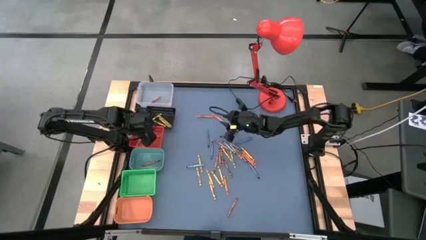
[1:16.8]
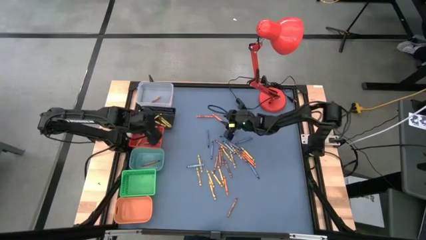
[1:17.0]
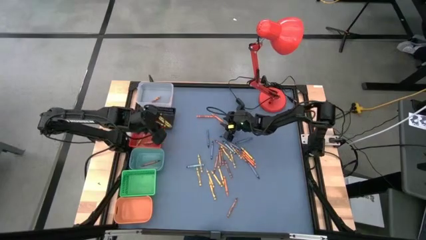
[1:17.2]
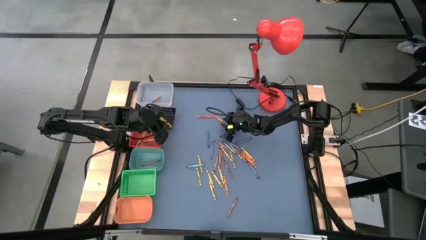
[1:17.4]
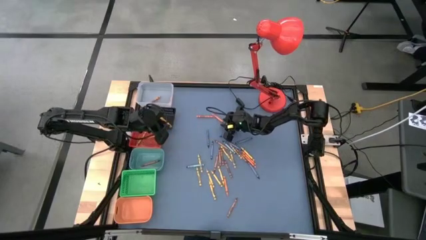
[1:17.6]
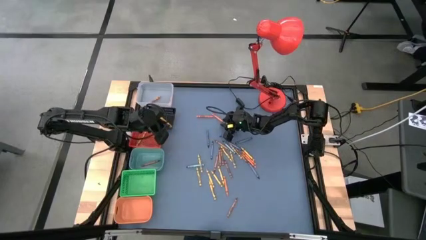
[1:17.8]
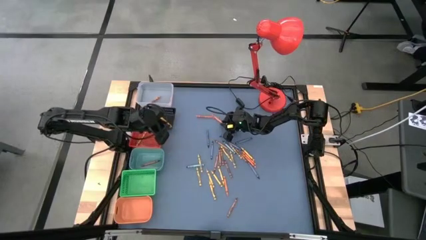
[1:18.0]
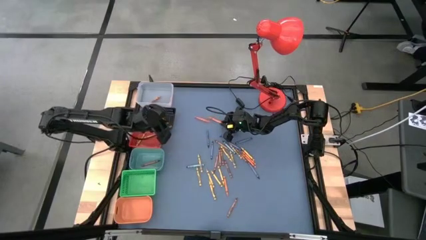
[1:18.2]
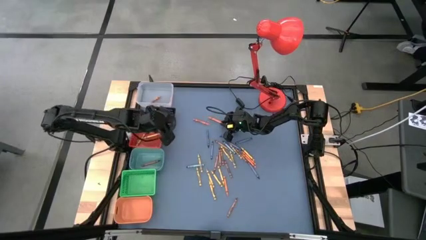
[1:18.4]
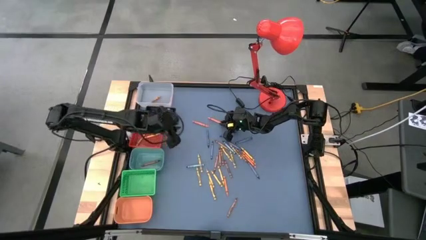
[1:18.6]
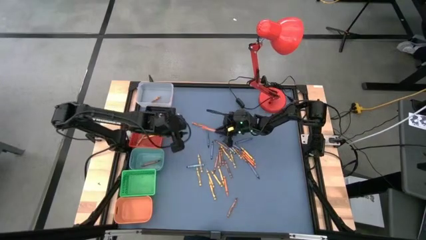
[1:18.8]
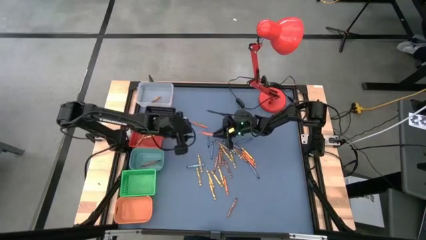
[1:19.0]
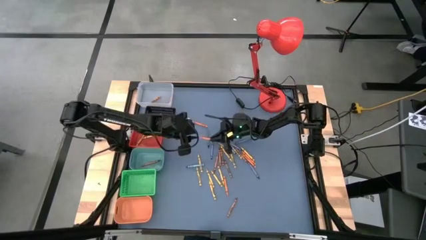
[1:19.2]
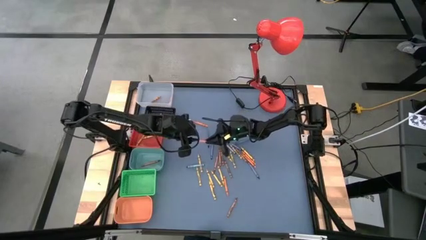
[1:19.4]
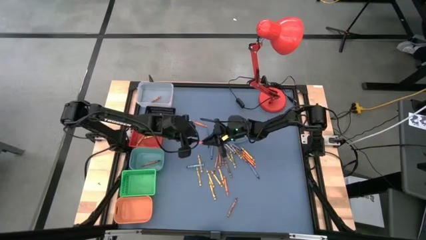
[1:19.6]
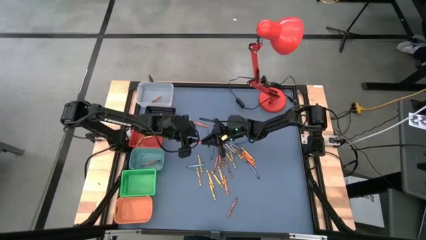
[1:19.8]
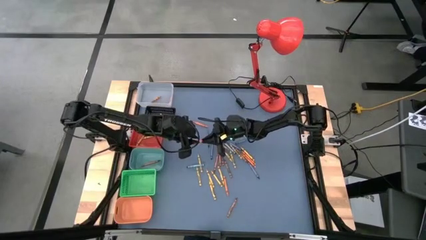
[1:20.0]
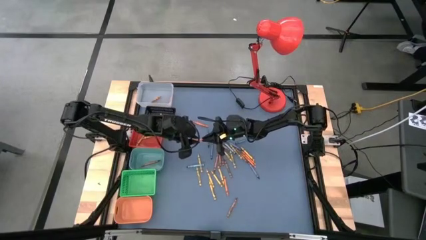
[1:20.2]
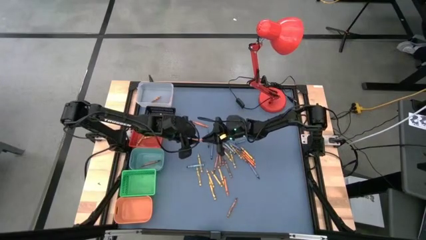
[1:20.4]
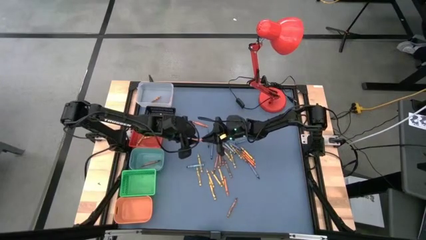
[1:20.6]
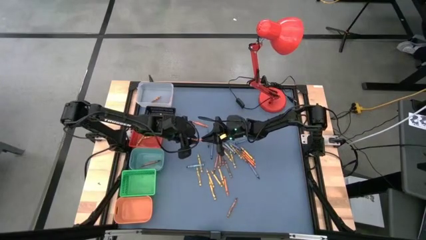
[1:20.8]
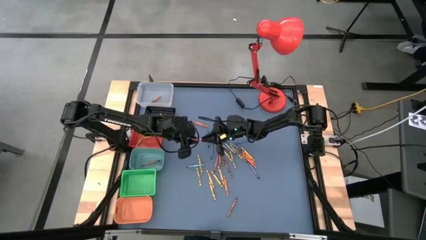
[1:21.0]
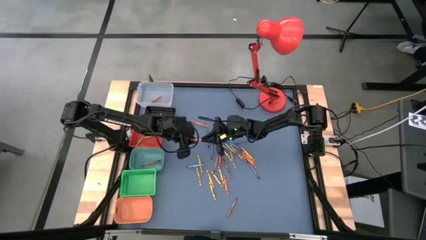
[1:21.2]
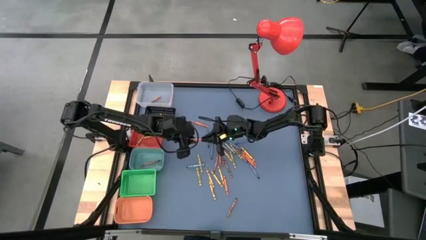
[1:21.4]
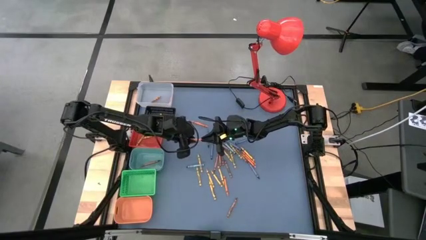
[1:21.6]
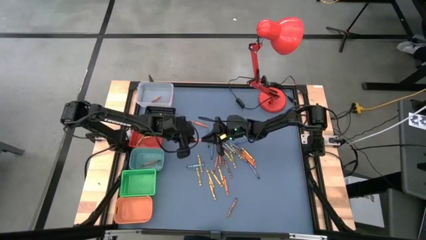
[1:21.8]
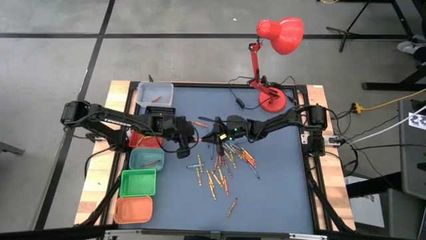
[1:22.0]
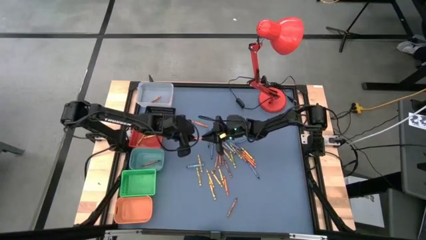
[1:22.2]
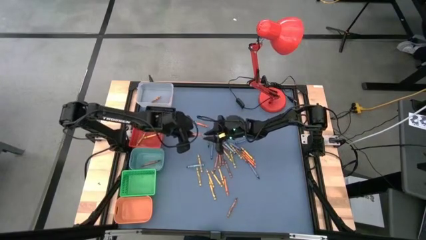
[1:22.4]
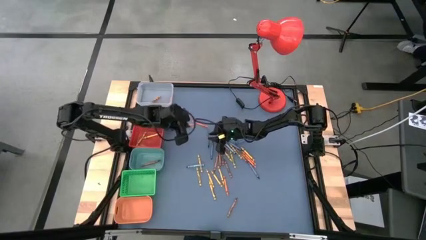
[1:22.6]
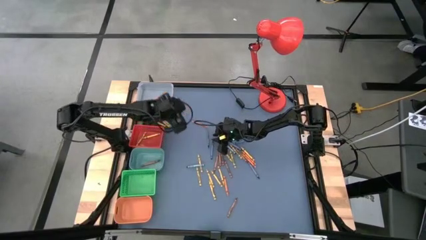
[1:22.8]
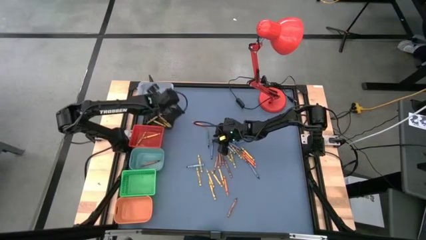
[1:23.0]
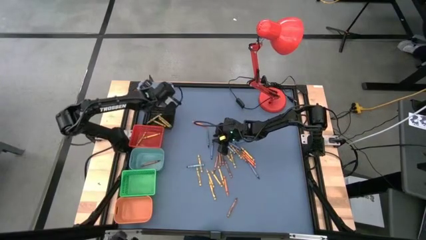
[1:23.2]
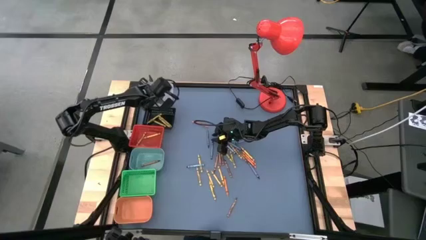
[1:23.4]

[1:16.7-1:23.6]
Task: Sort crayons
Put the orange crayon into the transparent bin

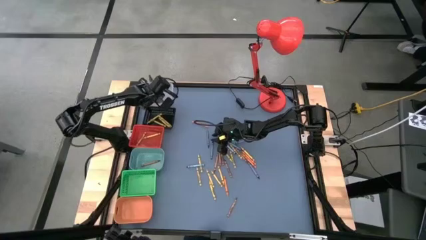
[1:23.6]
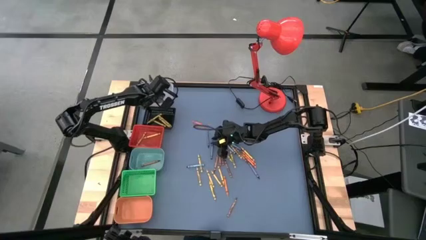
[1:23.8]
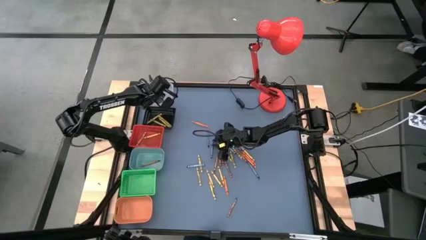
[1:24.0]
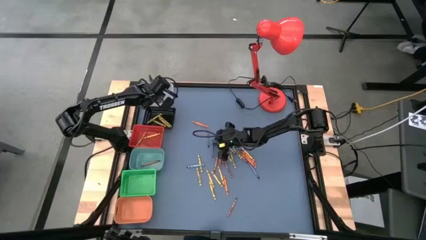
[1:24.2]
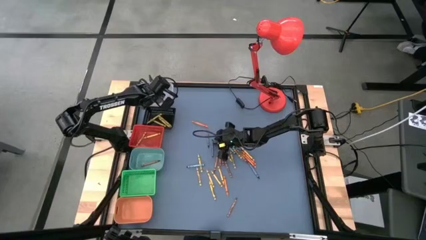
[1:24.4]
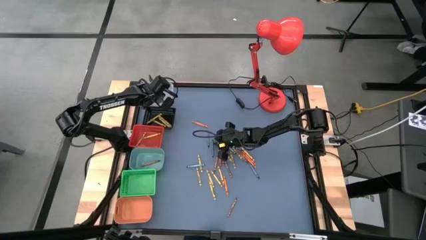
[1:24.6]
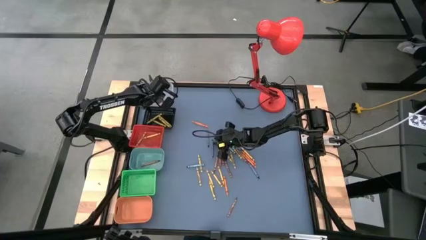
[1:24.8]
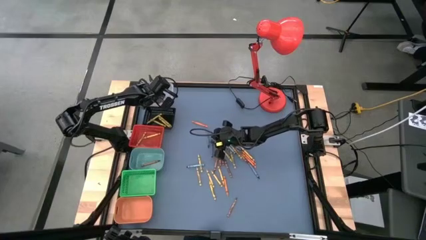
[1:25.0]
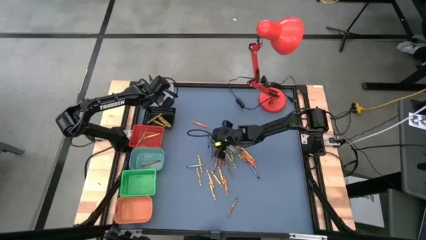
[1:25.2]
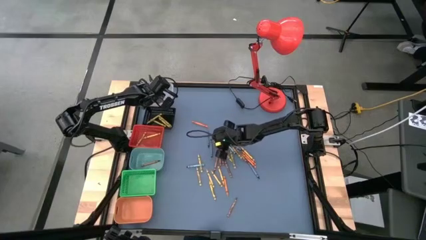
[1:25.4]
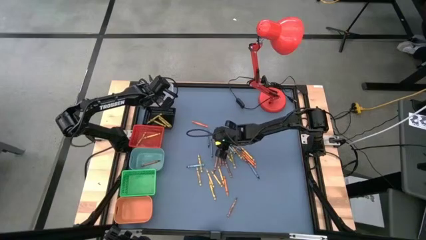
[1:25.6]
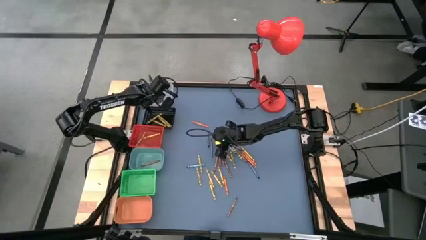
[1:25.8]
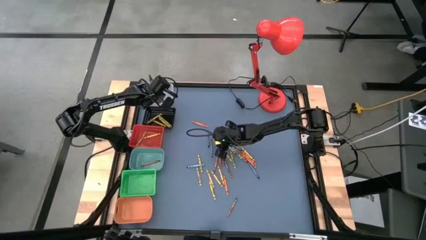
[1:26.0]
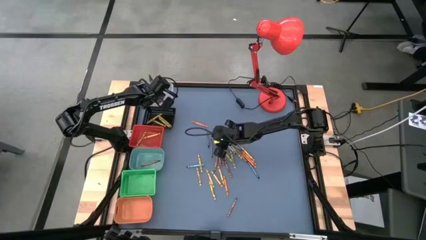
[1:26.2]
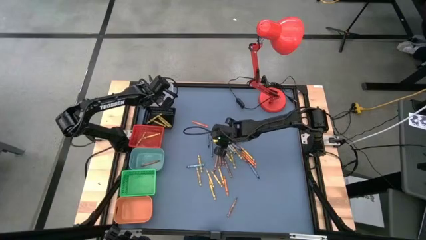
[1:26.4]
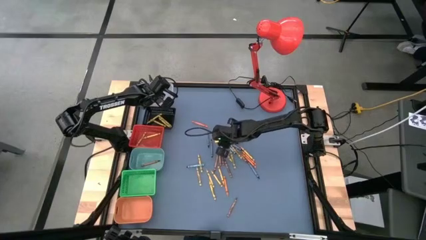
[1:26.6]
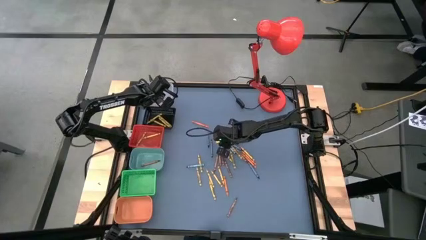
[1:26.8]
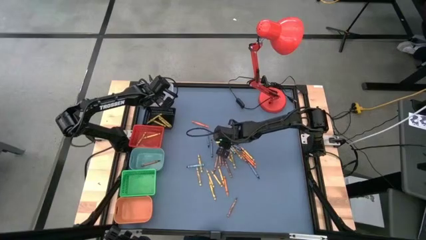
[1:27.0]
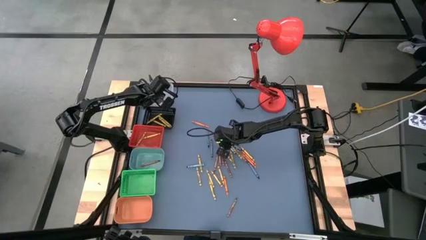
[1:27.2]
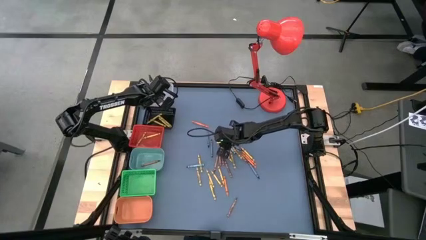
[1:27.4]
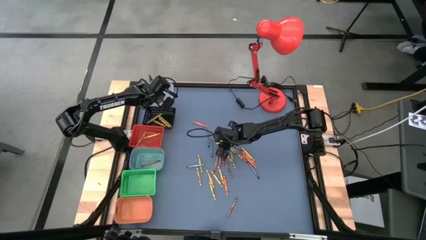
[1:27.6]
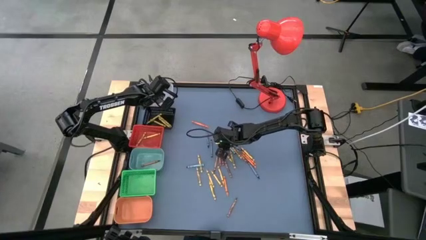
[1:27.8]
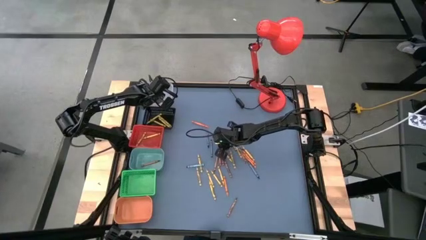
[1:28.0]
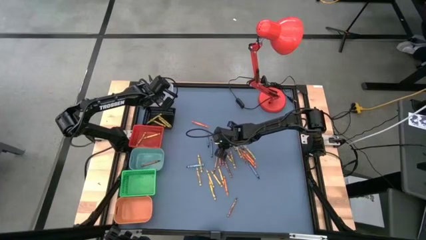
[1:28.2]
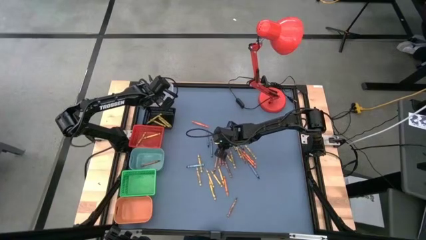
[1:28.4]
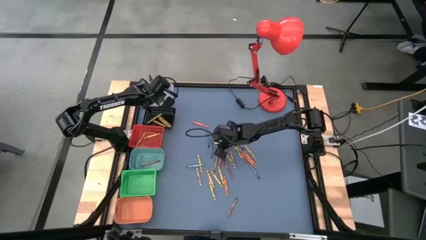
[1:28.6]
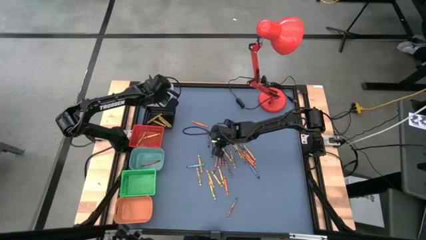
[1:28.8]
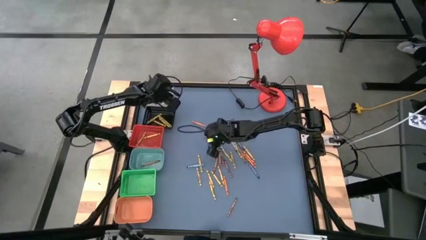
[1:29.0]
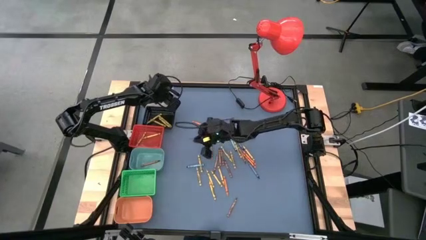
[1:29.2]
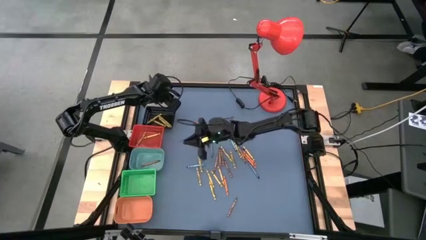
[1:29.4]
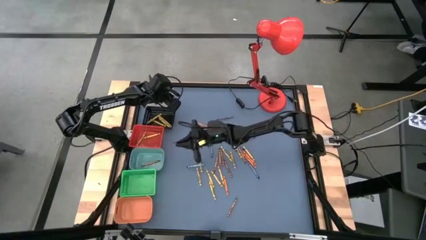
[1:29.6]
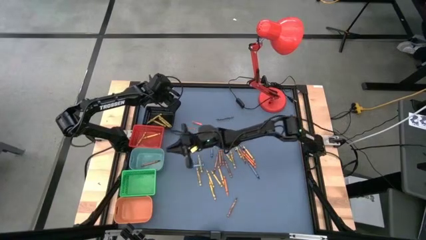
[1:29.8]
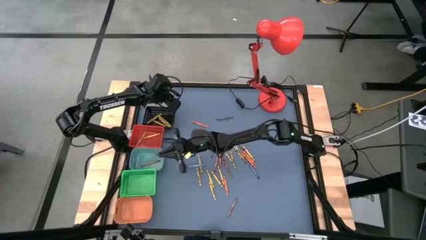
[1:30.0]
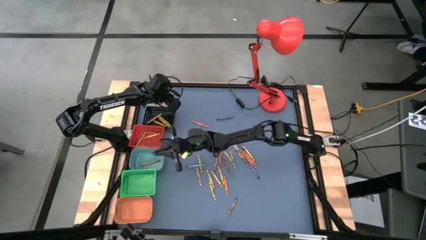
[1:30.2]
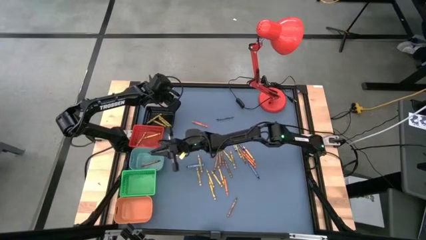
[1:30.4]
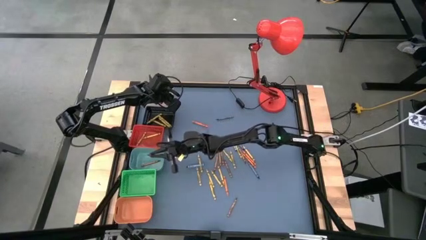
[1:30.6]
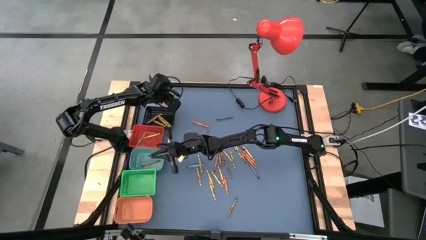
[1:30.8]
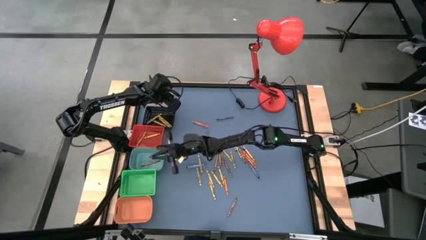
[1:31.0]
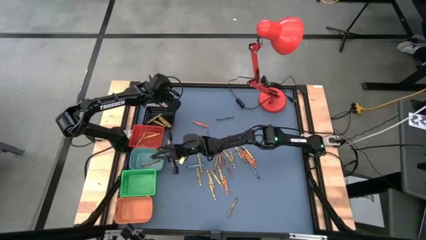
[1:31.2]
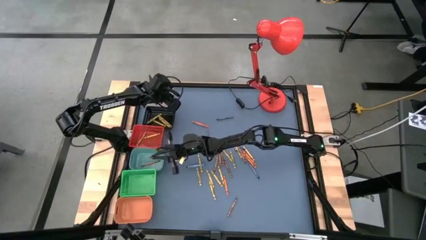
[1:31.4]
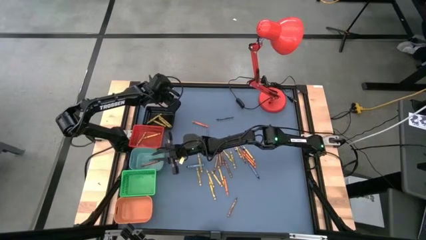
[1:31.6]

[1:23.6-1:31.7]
Put the brown crayon into the blue bin

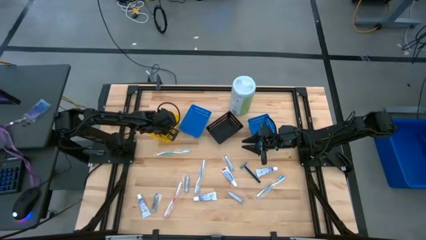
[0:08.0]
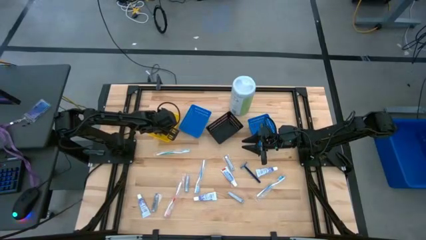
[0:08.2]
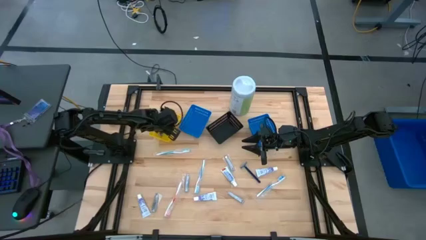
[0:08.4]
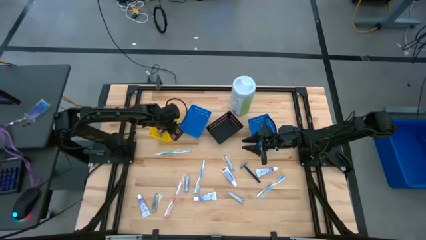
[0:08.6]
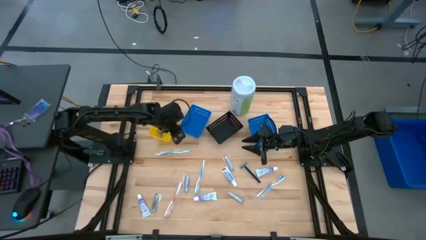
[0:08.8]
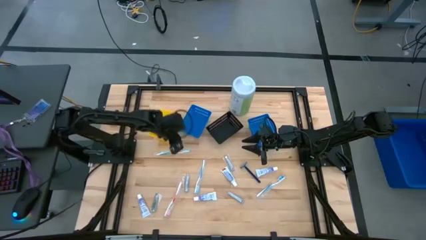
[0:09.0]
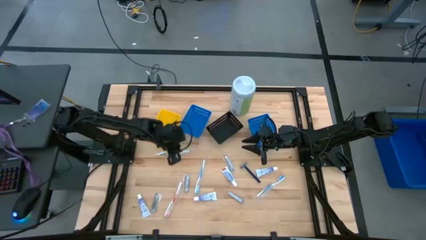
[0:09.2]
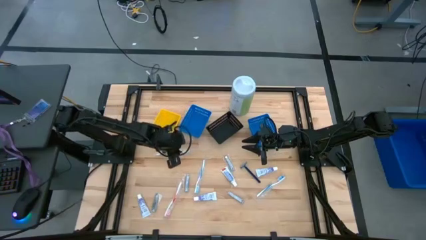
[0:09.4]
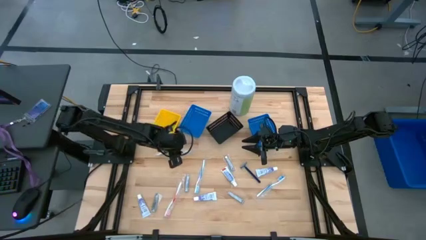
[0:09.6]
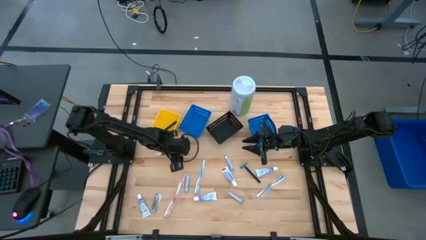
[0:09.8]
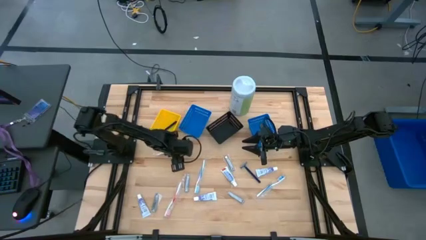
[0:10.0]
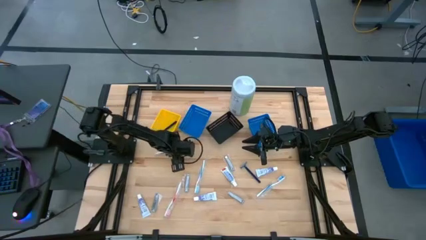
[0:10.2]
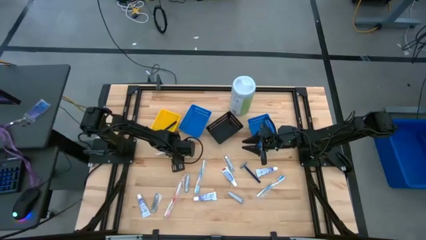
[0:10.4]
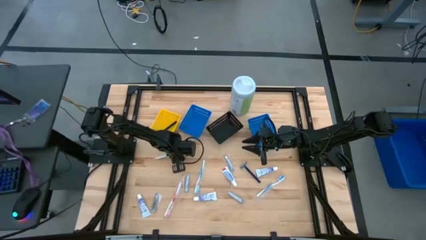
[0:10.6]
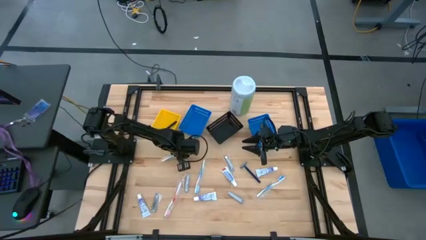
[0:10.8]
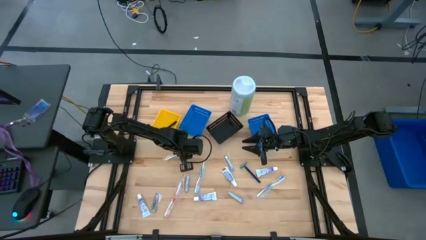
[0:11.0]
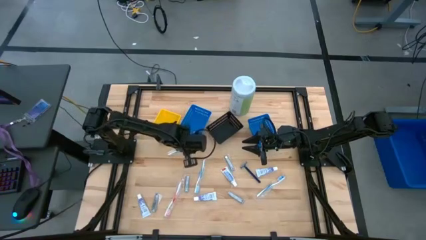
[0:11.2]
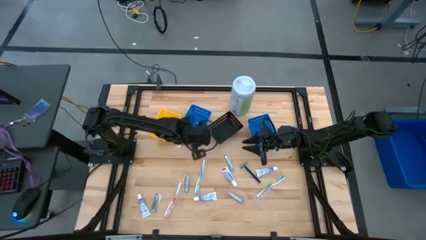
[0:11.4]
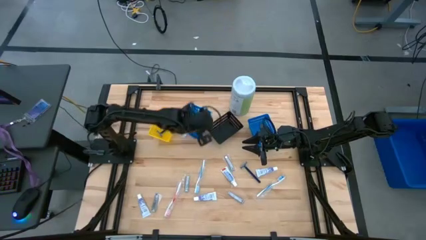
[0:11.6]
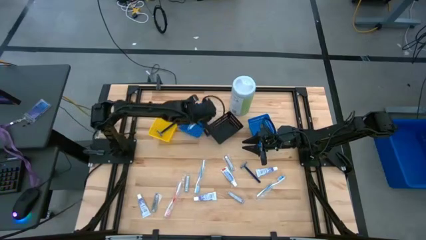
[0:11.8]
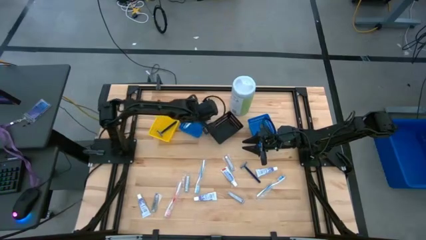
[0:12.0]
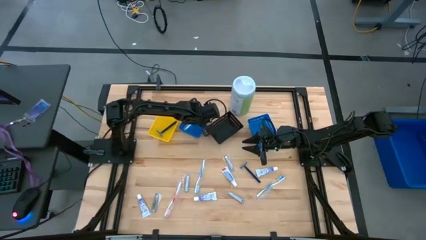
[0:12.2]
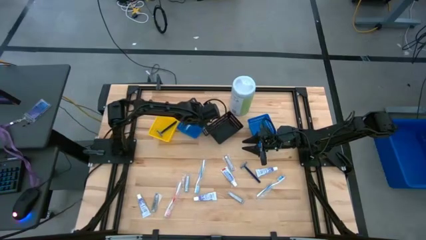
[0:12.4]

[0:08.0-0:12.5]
Task: Pick & Place Travel size toiletries
Put the green toothbrush into the left blue basket
